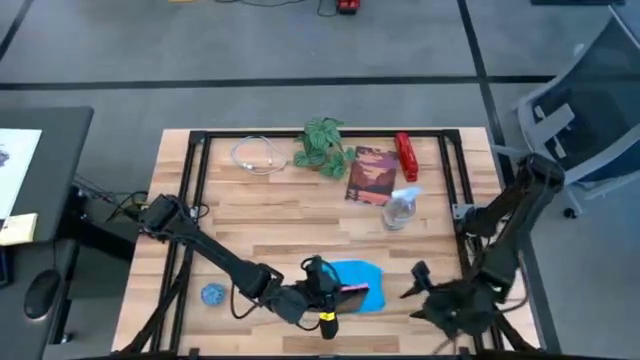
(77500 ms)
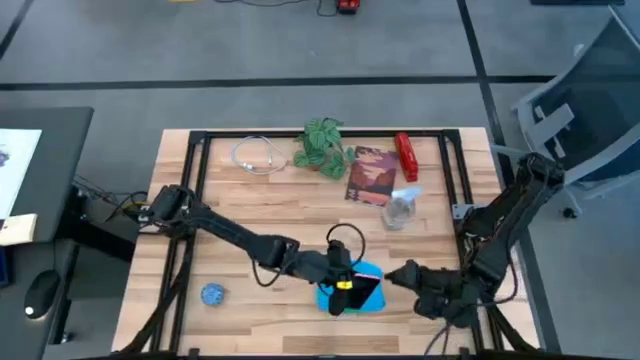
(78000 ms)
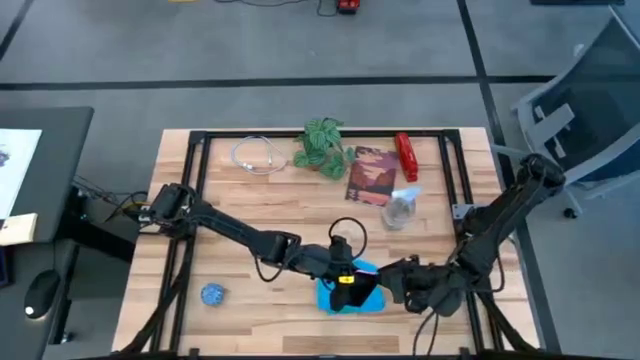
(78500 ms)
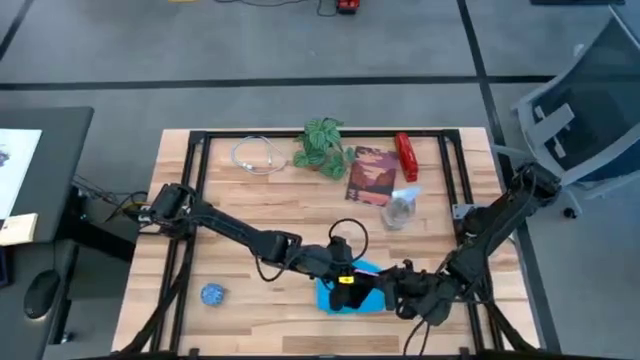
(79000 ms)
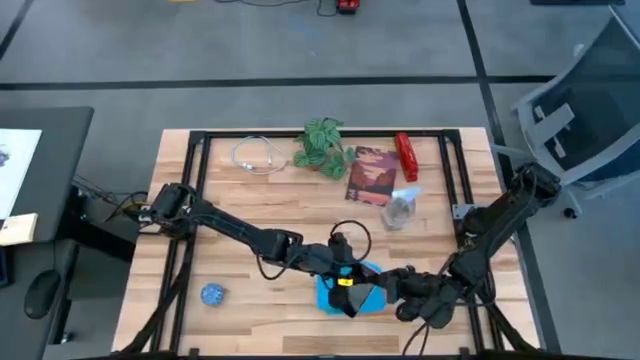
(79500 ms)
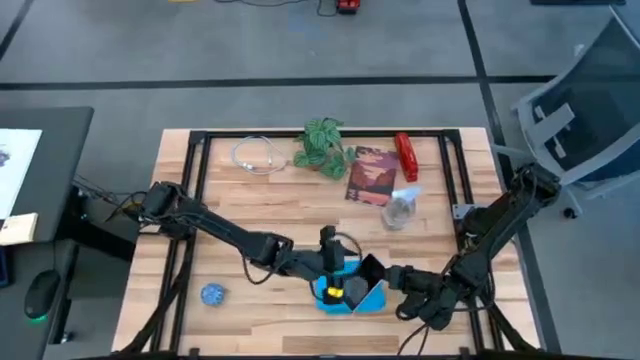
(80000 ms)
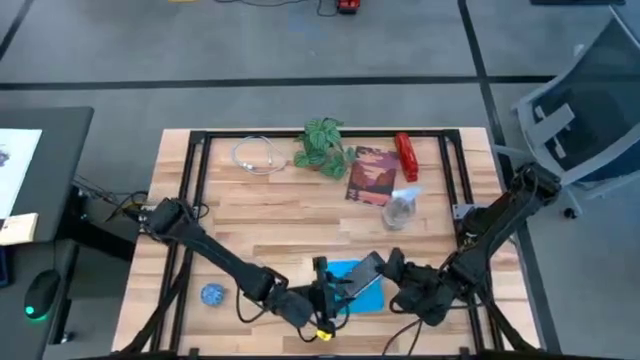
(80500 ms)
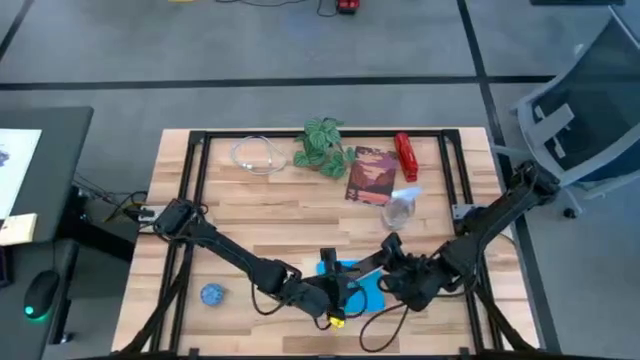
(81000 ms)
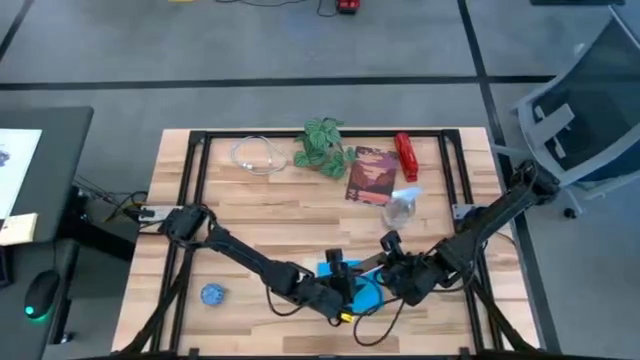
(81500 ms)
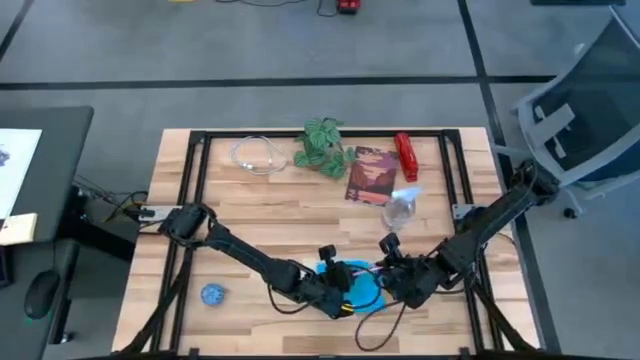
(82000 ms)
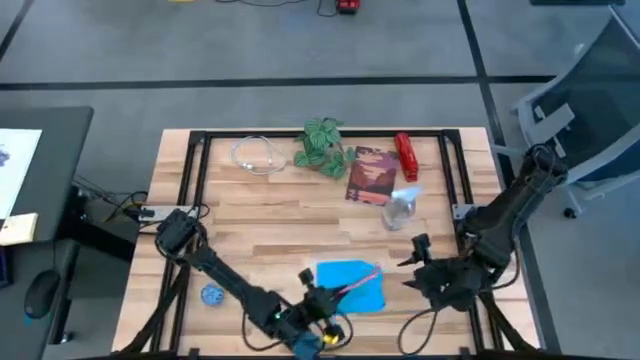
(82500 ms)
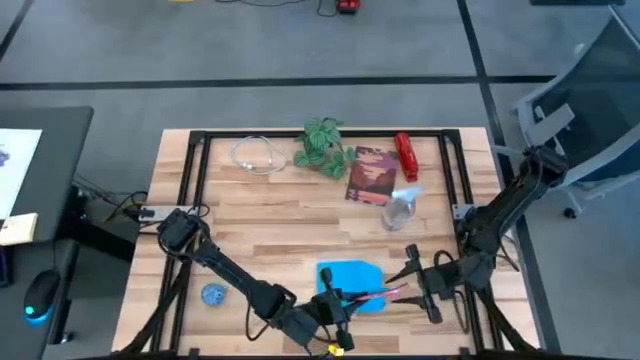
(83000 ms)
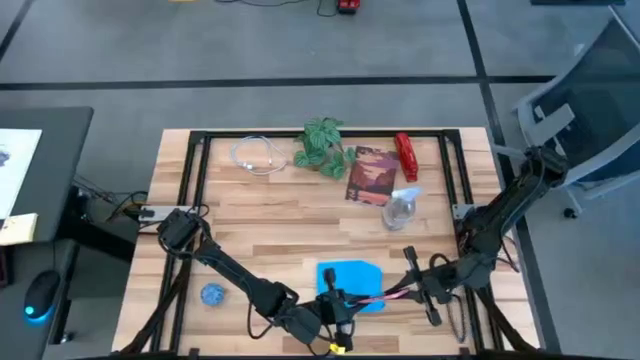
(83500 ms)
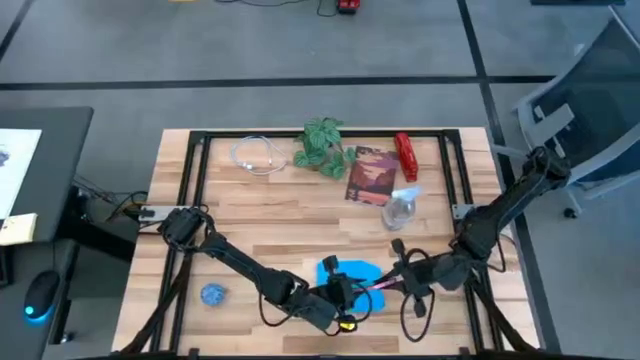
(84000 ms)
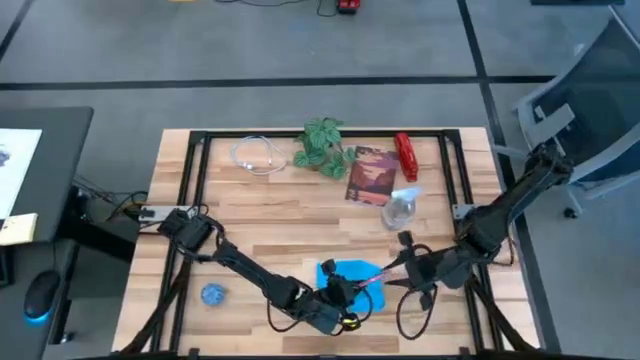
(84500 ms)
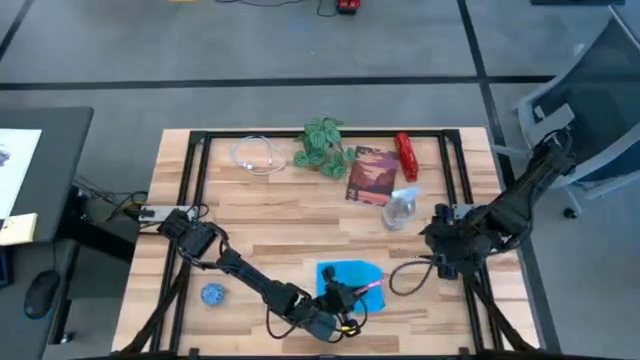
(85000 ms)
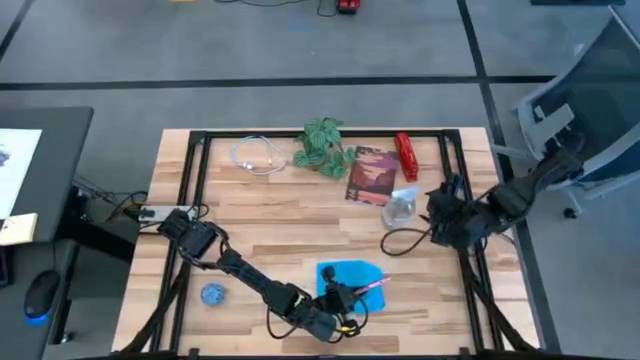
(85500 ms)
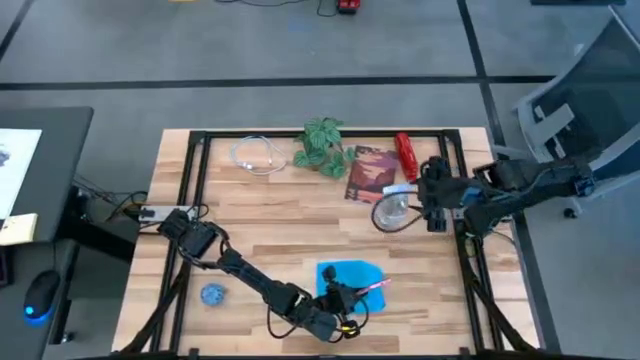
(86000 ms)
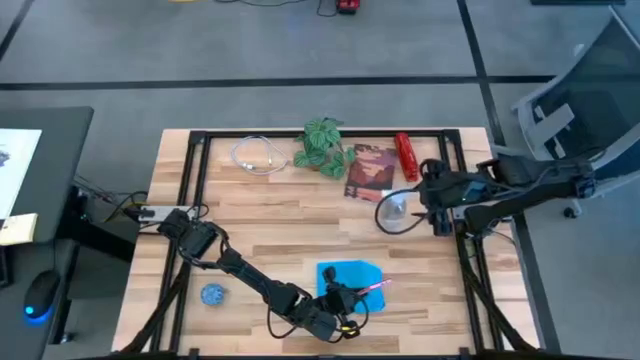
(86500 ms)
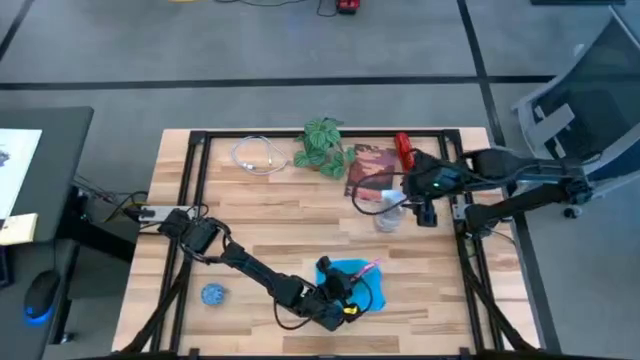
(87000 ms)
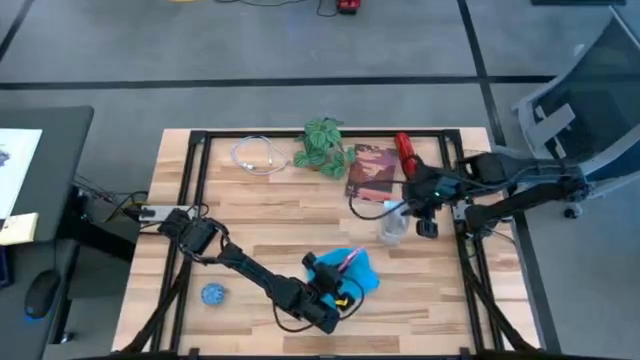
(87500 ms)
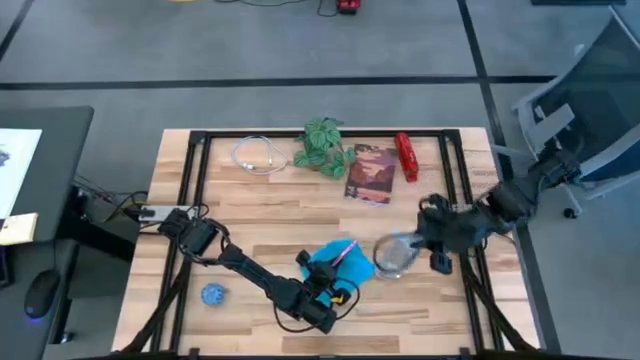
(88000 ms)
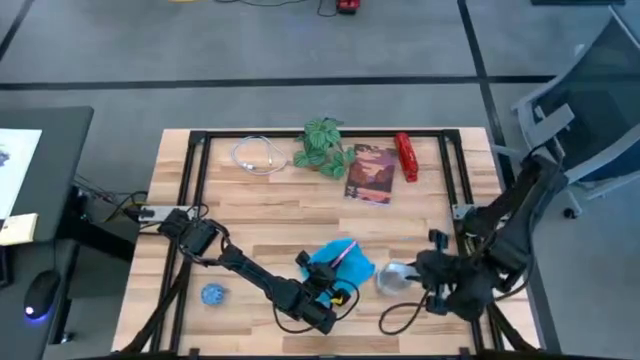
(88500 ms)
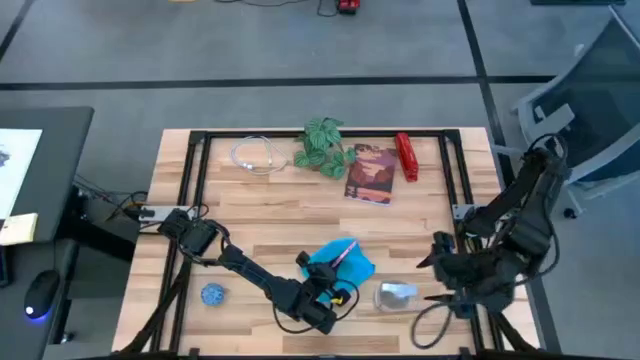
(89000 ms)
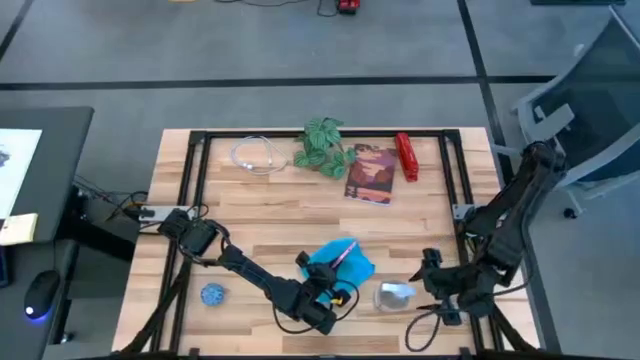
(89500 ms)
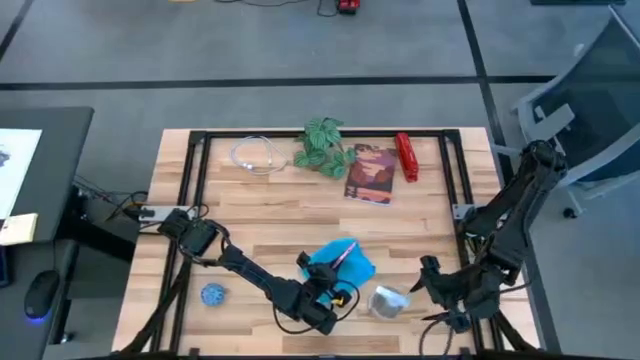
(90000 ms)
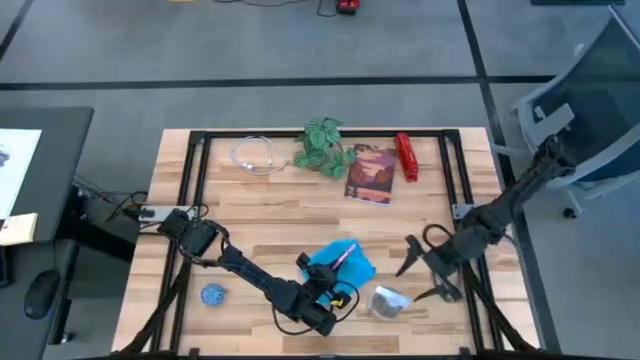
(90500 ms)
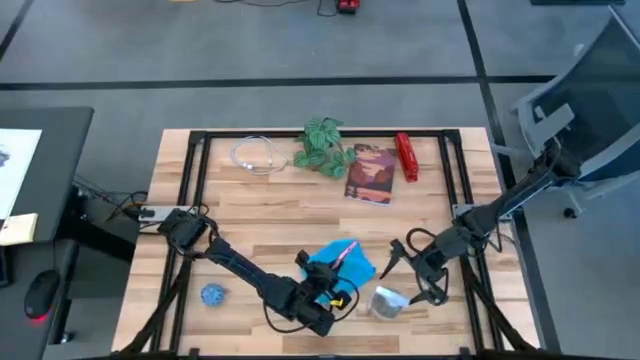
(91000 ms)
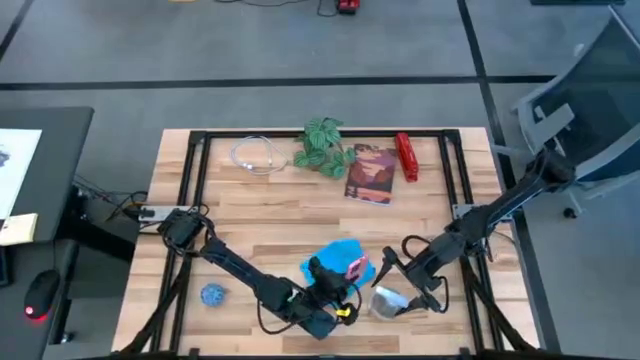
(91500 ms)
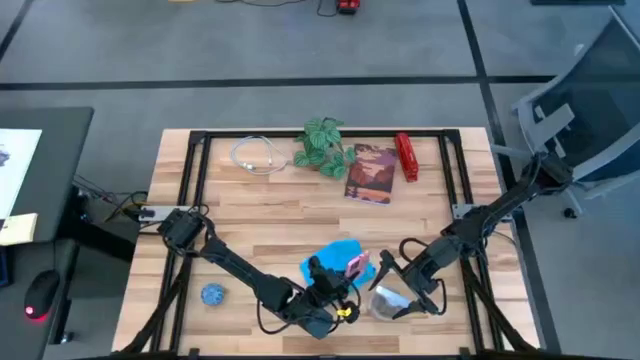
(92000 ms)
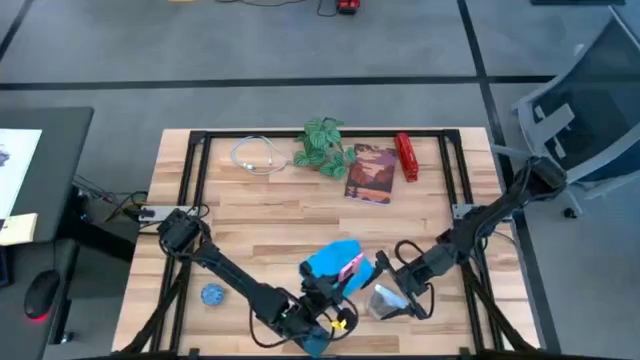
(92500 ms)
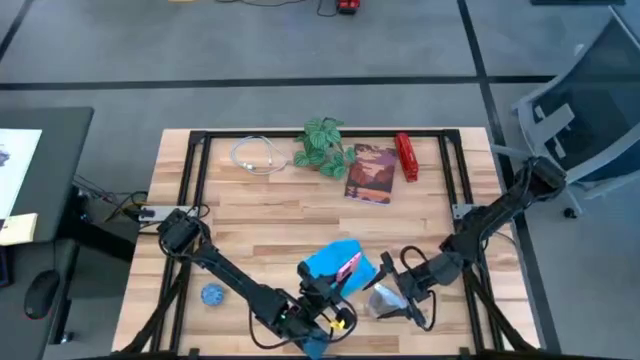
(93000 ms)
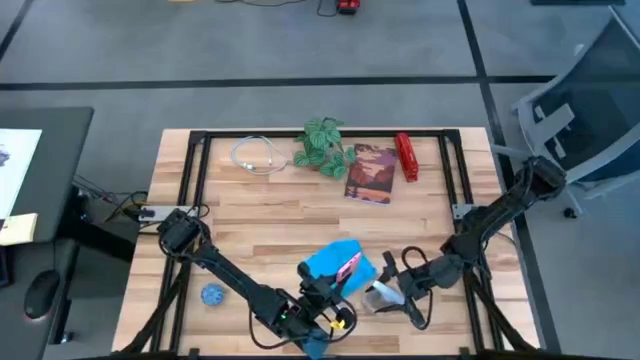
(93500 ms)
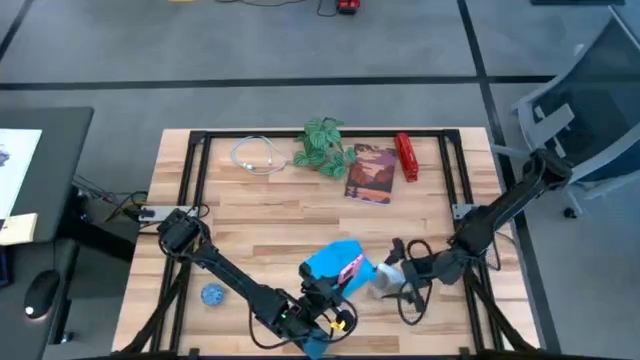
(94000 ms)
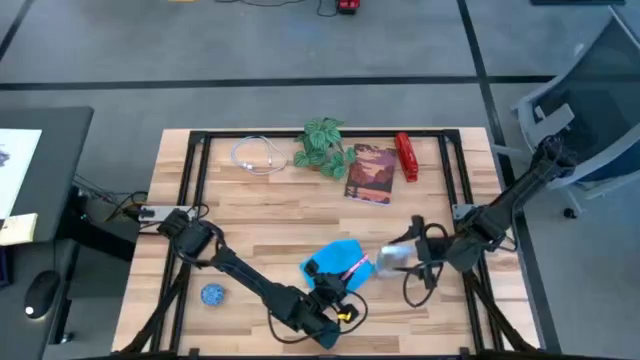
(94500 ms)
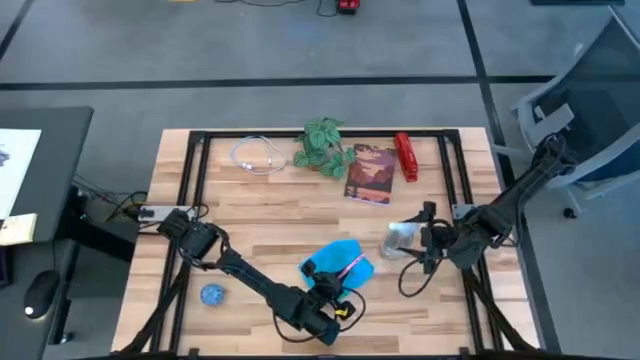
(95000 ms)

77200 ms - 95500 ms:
Task: Apply microfiber cloth
Spray the back of the pink cellphone with the transparent spray bottle

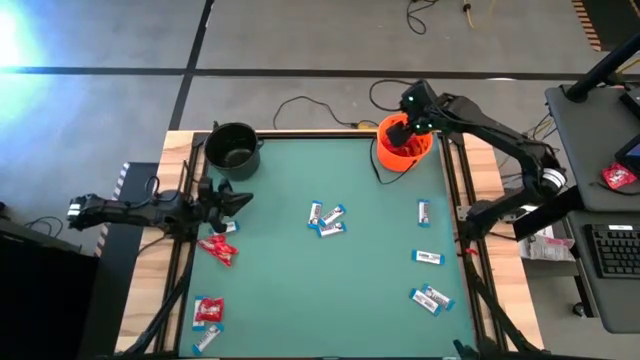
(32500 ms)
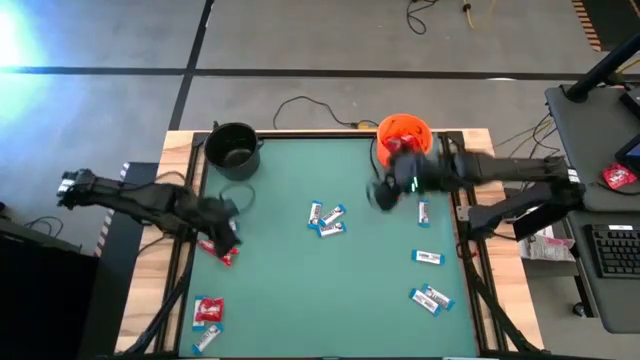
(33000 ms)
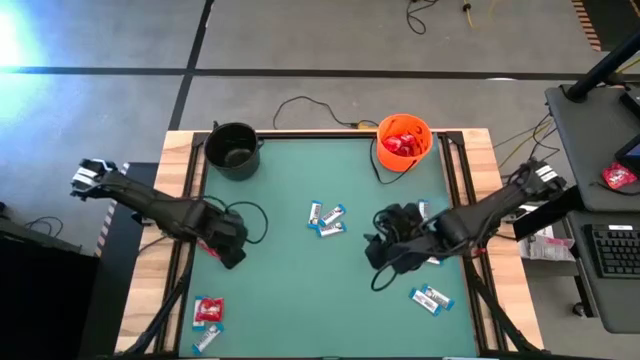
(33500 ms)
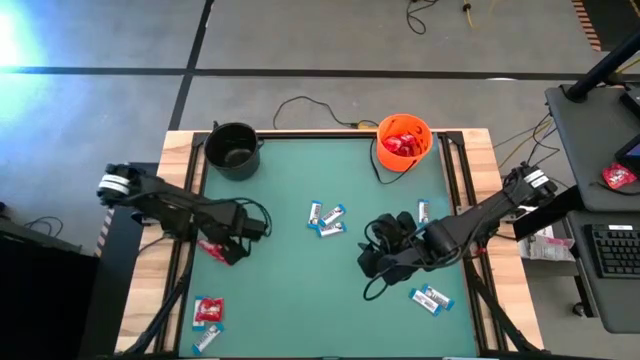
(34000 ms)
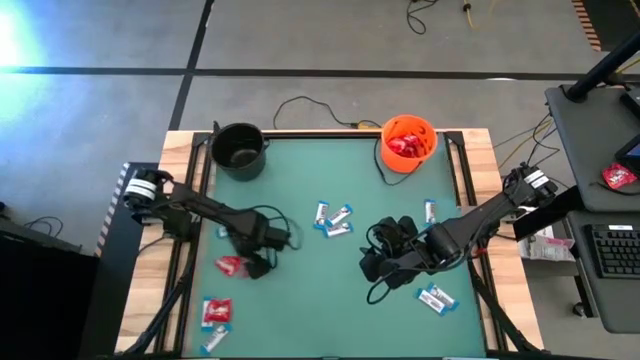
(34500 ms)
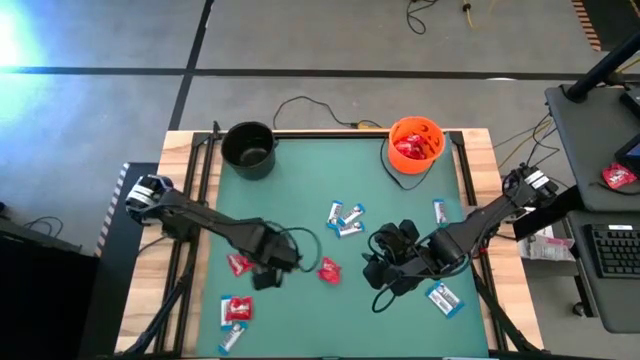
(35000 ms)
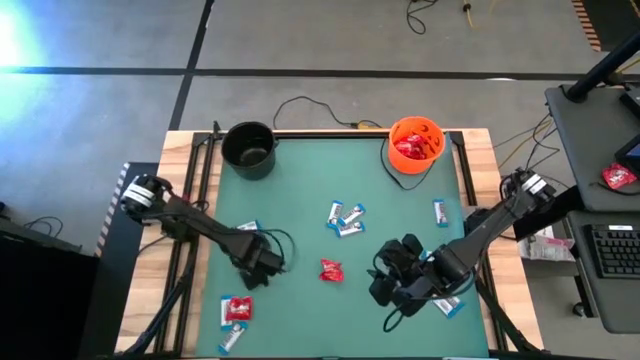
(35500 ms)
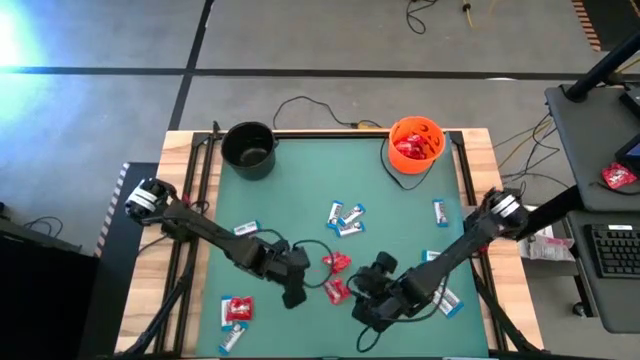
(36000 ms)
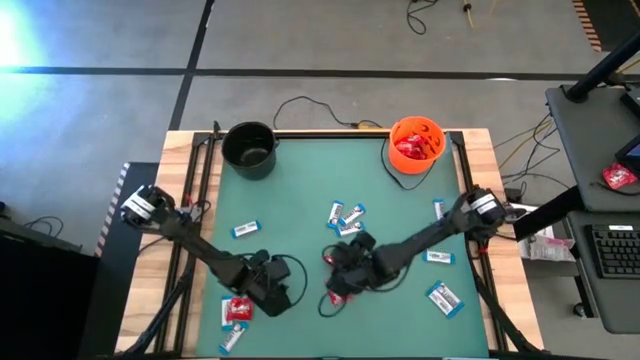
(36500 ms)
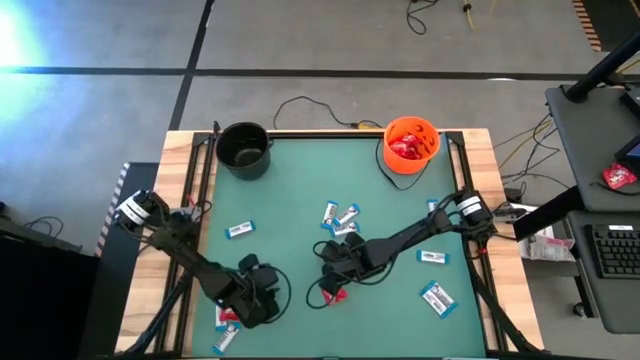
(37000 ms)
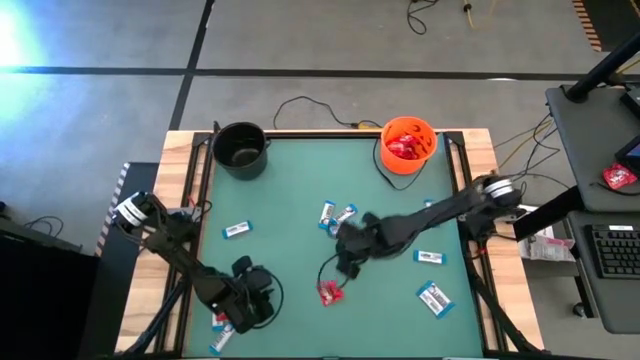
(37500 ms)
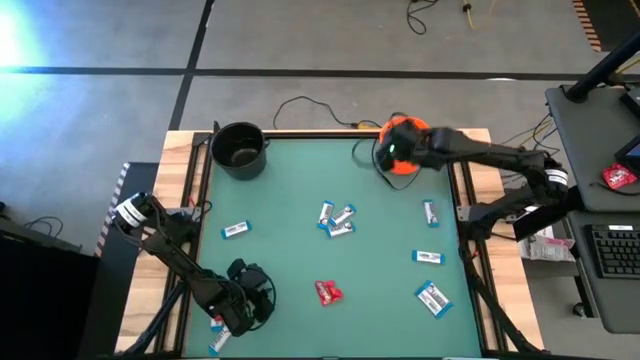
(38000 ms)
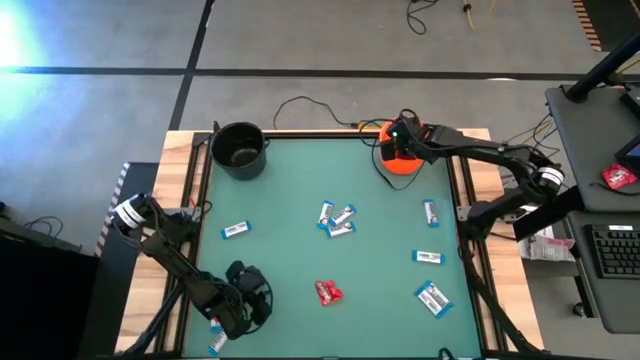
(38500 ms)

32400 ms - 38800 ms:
Task: Sort candy by brand, put in halloween buckets
Put the red candy into the orange bucket
